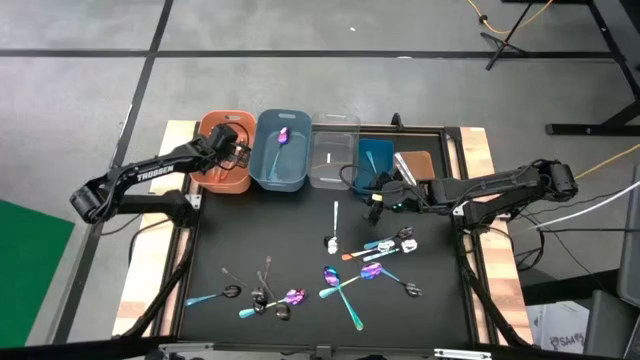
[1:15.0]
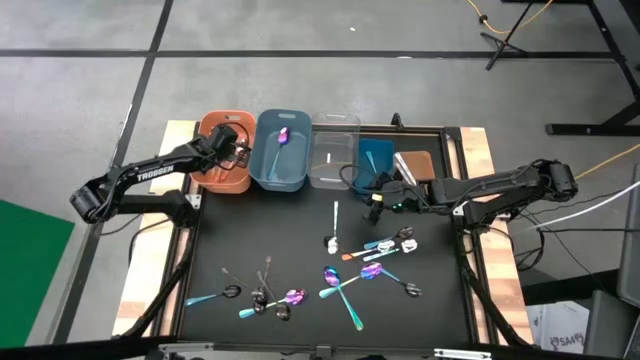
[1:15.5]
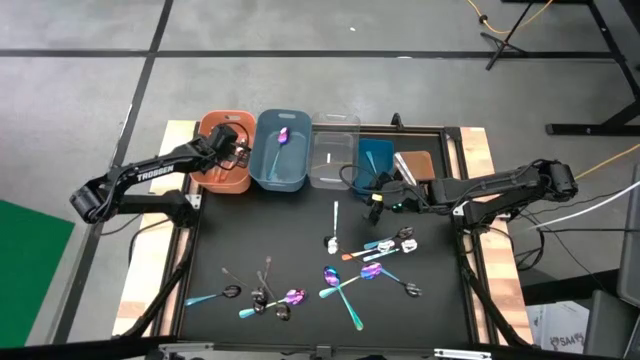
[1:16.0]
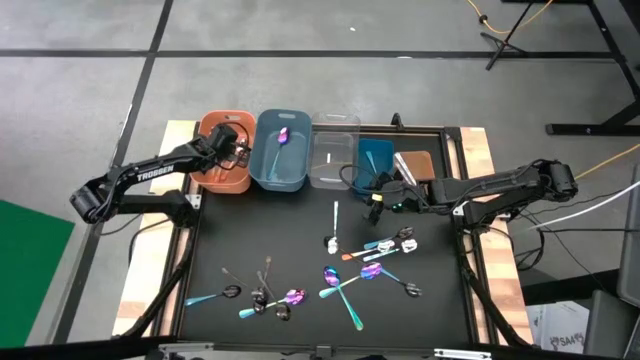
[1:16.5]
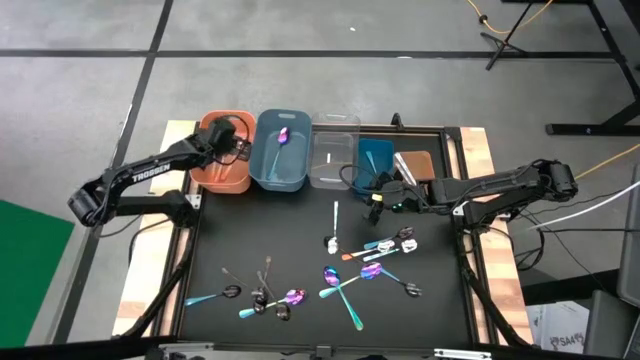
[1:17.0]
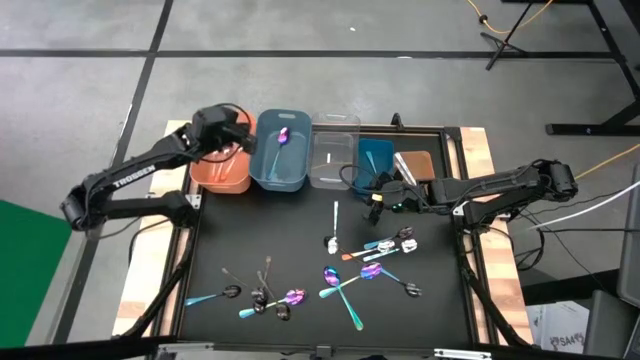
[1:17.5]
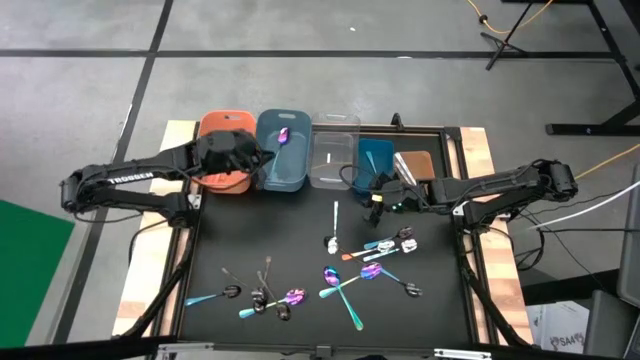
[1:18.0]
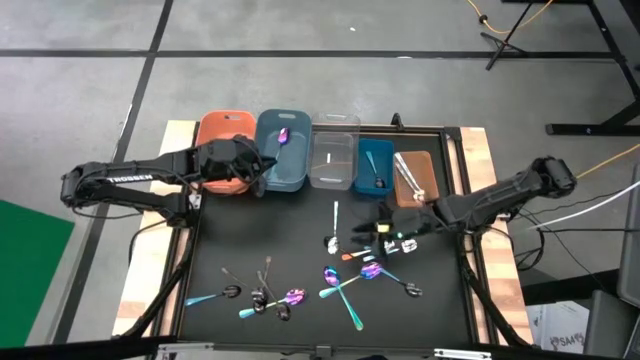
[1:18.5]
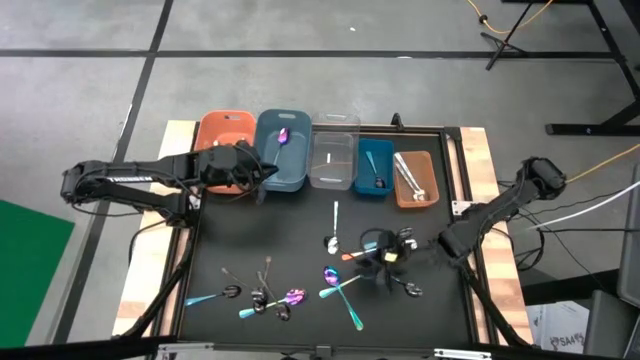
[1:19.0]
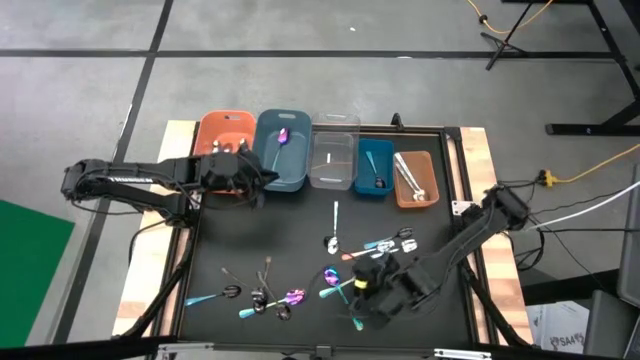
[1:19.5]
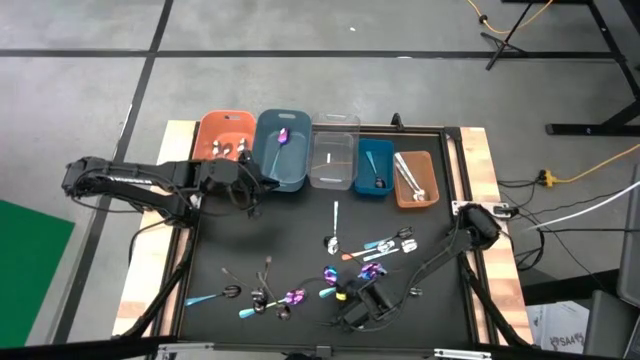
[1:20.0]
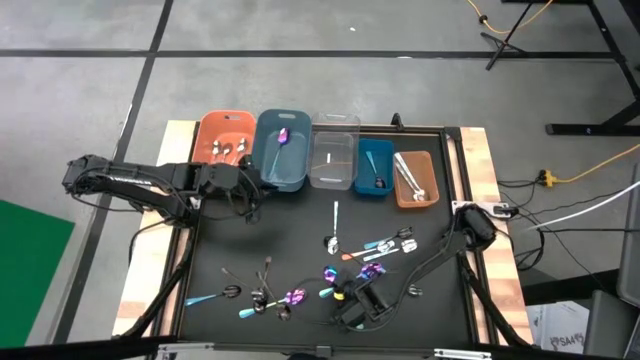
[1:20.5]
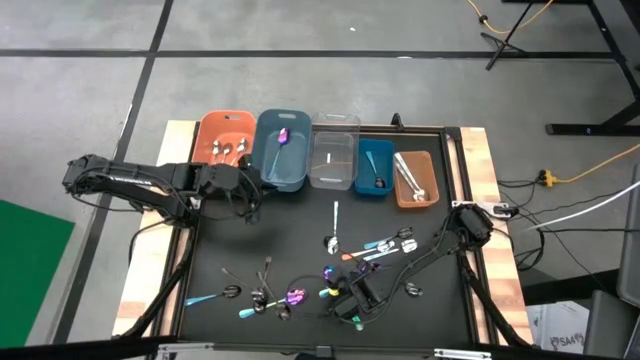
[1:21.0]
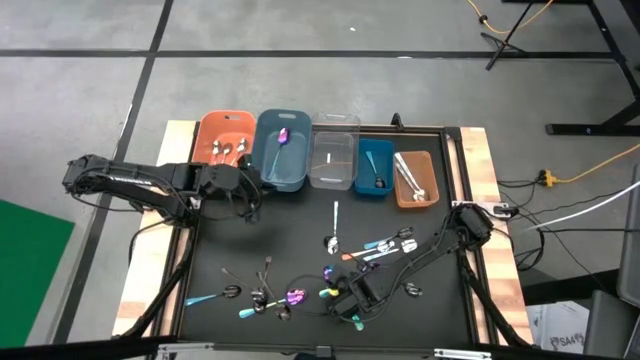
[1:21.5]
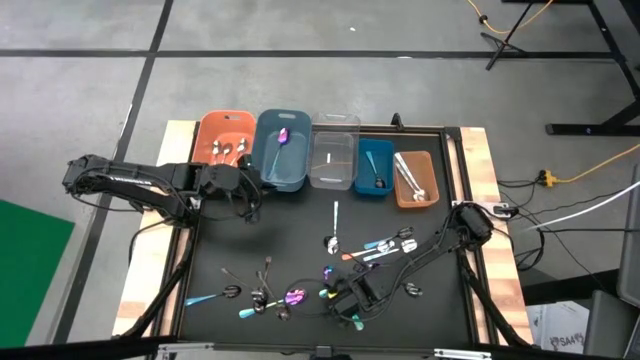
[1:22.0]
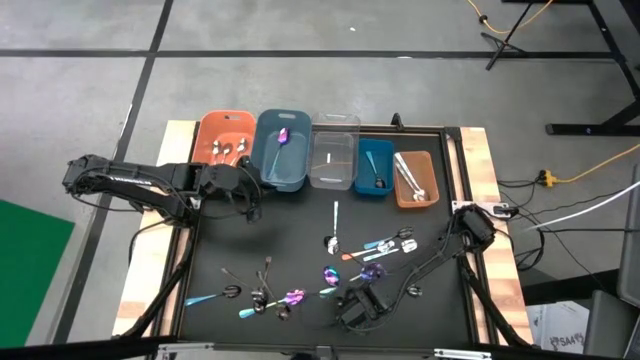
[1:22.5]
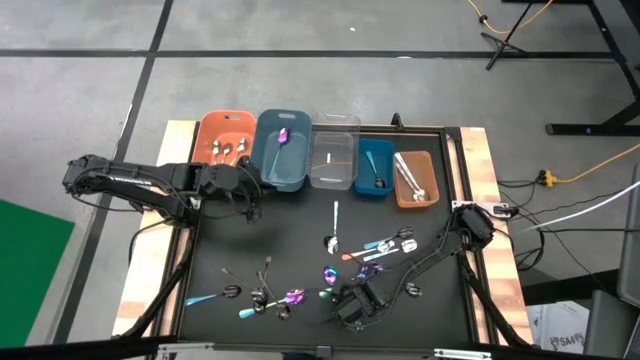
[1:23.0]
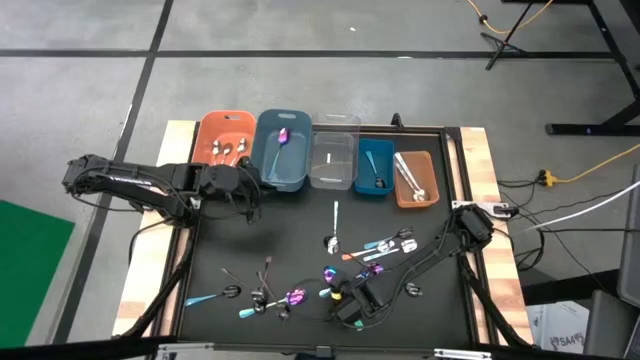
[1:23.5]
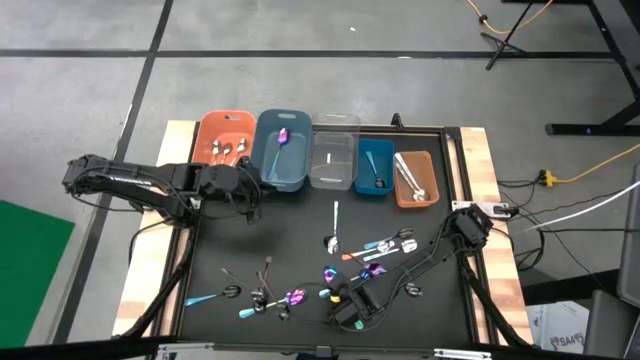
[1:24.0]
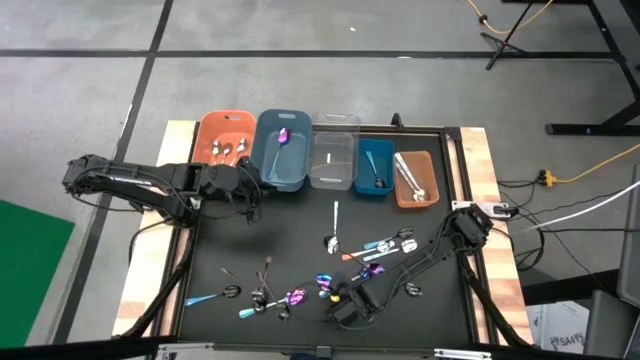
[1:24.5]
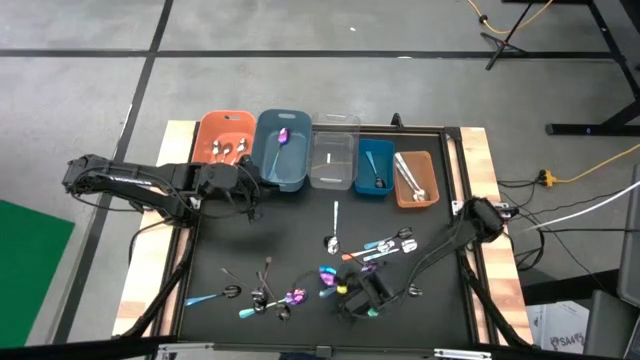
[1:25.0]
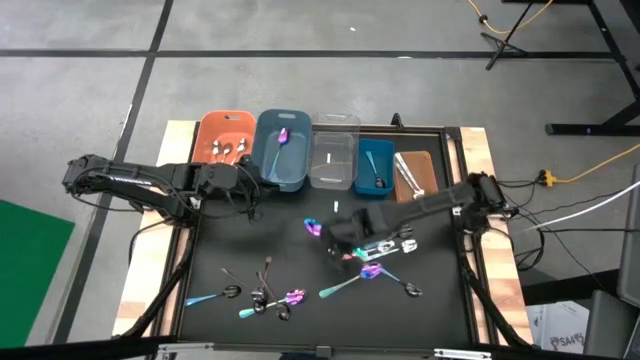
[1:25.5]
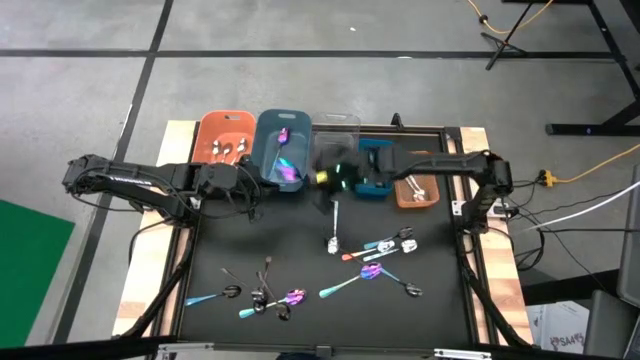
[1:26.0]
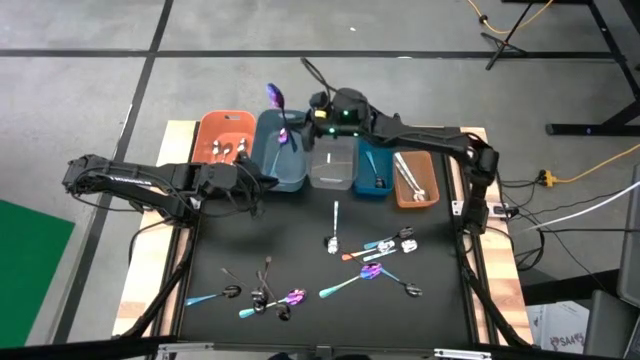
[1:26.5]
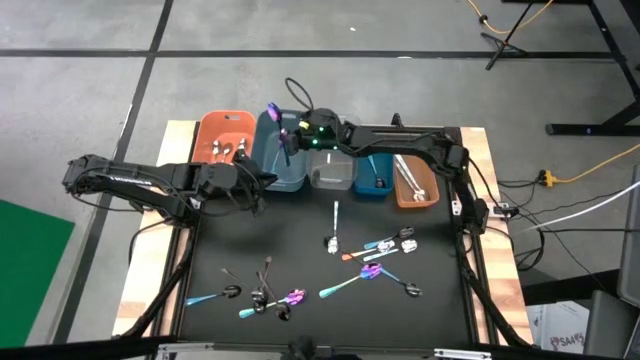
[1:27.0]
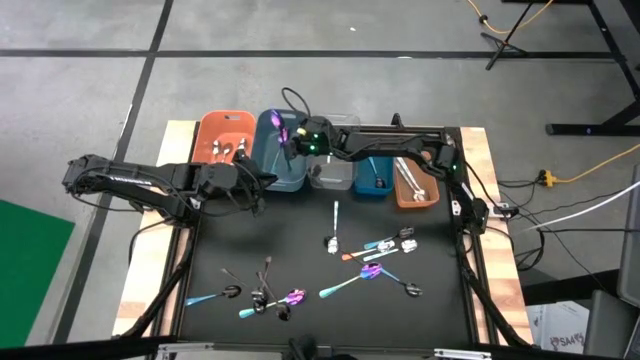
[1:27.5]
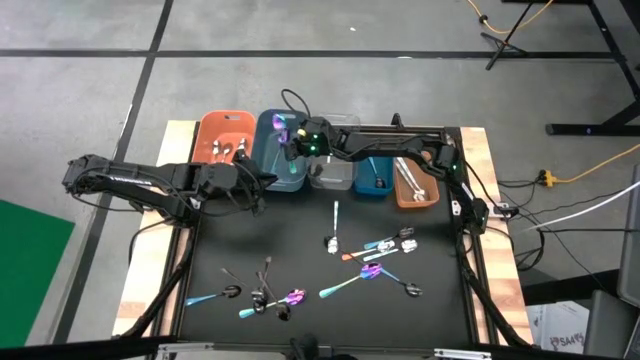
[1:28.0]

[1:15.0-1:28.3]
Task: Sort silverware by color (type)
Put the purple spoon into the left blue bin

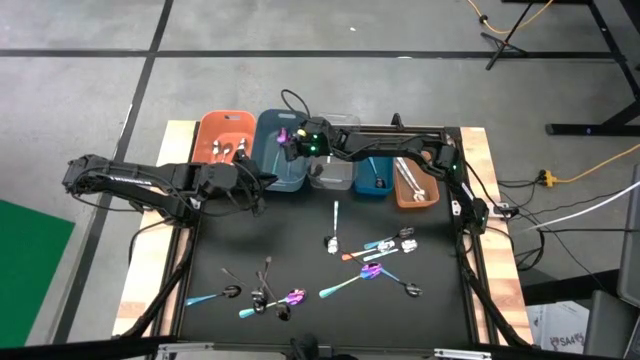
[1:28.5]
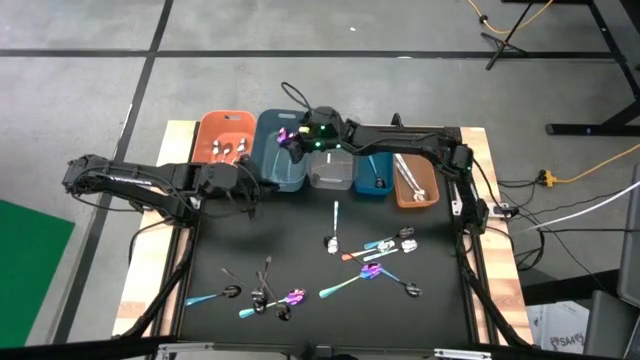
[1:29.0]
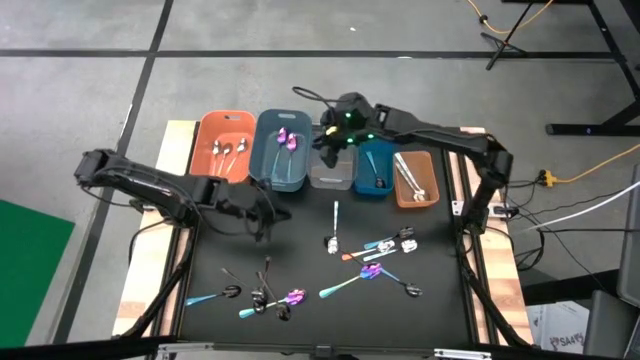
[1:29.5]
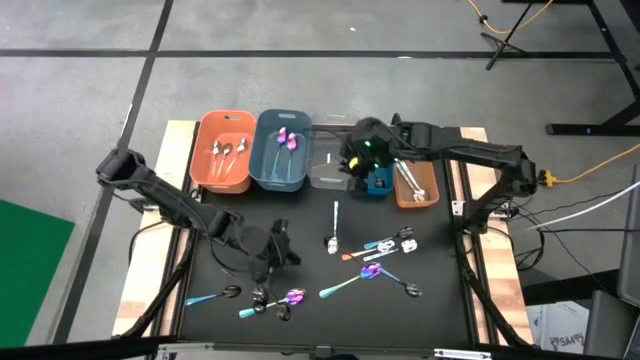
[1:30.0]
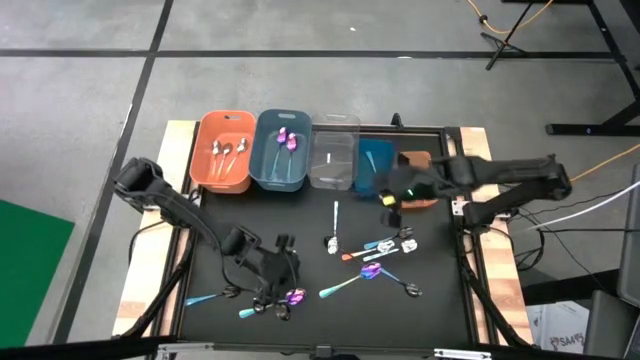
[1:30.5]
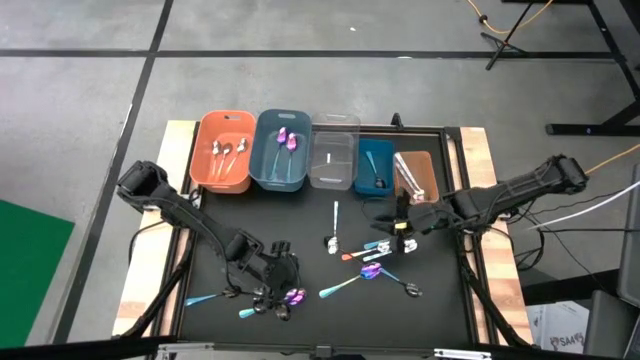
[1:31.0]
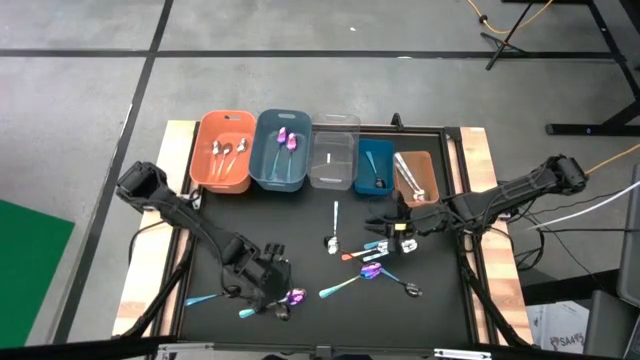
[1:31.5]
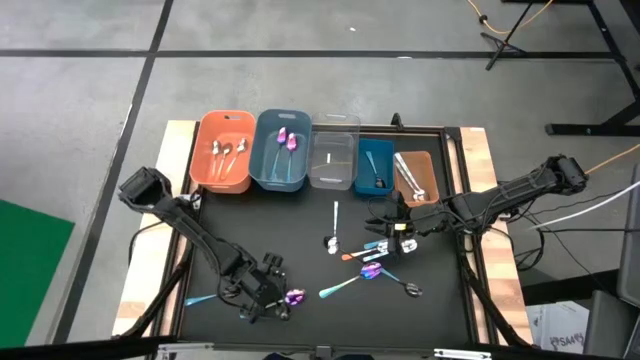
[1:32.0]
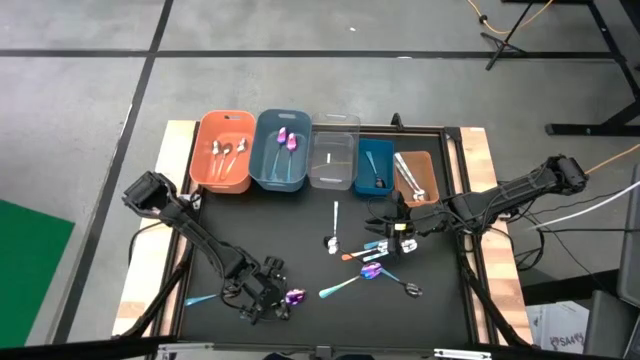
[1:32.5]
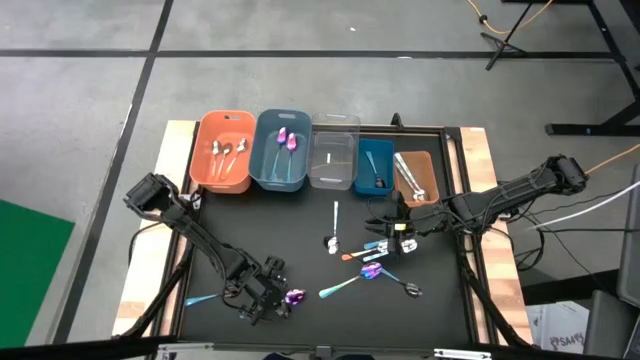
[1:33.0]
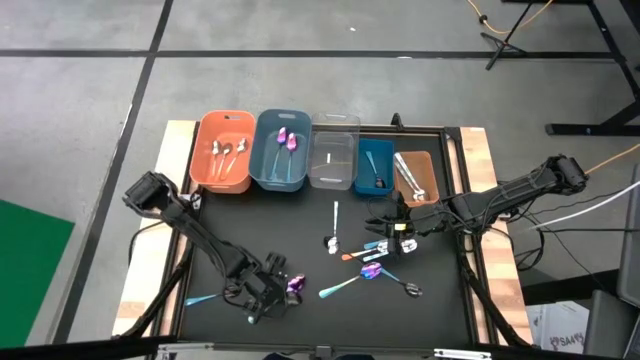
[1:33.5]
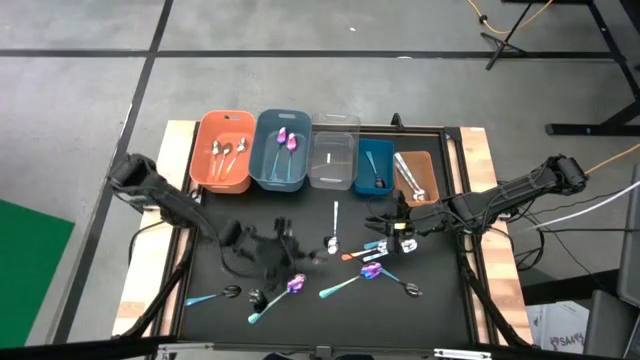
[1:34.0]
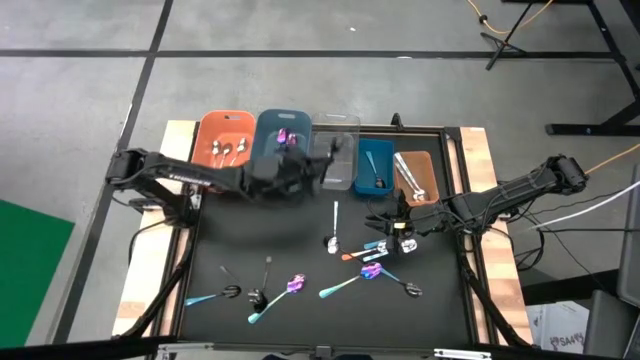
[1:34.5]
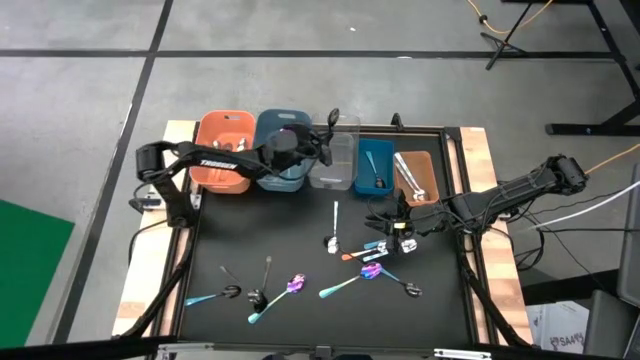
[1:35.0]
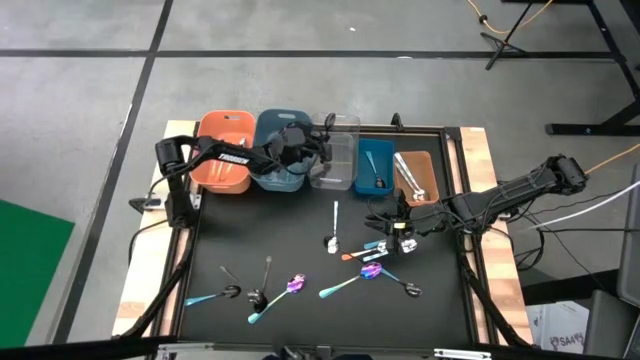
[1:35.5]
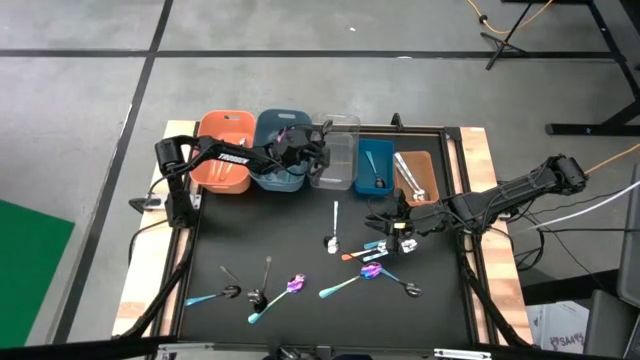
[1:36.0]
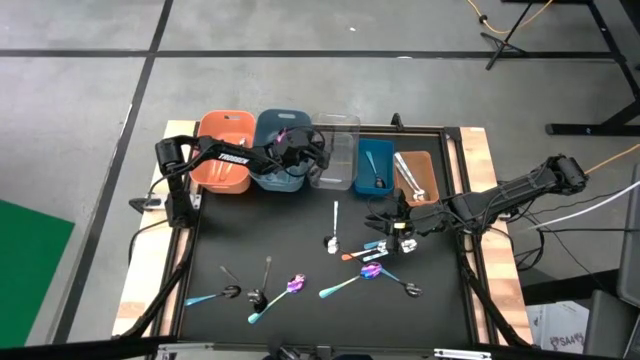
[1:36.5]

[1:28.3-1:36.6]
Put the black spoon into the transparent bin
